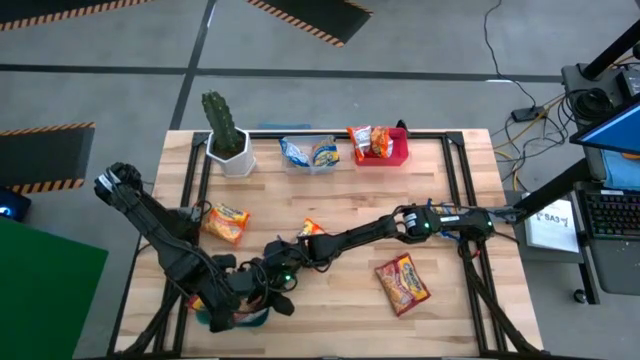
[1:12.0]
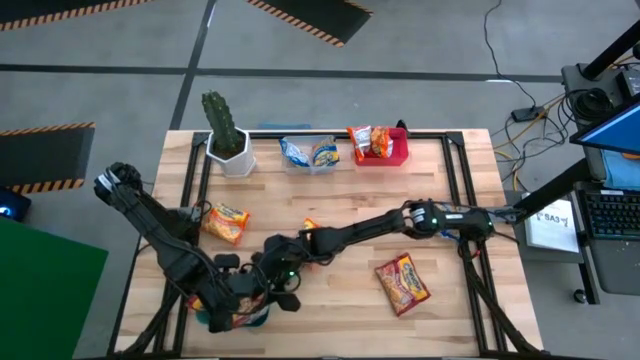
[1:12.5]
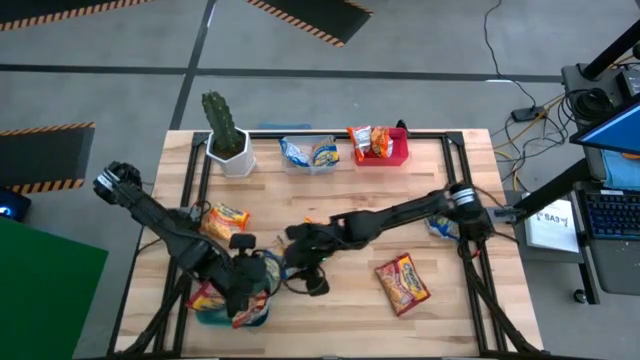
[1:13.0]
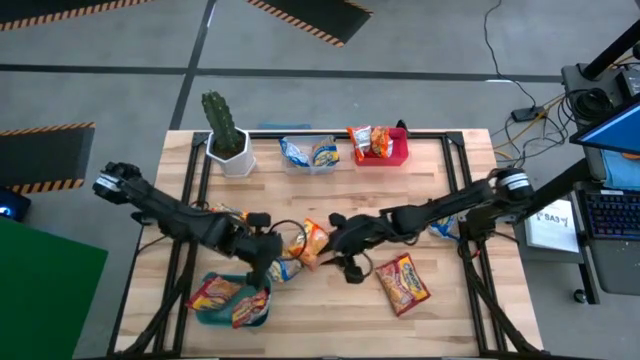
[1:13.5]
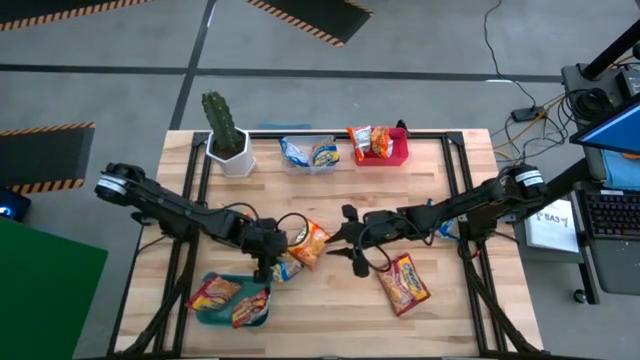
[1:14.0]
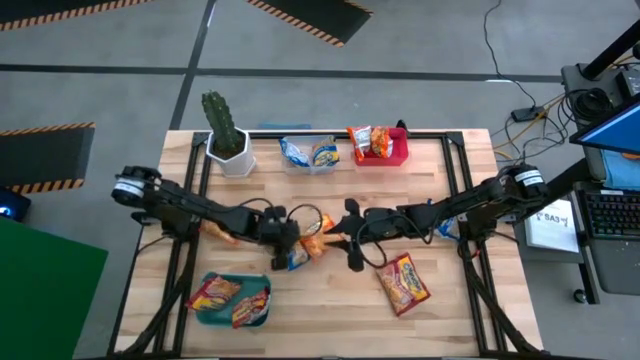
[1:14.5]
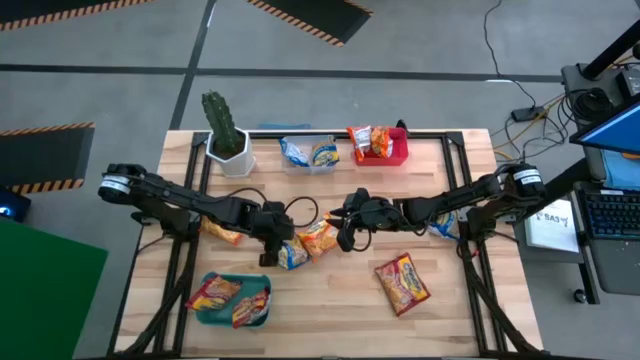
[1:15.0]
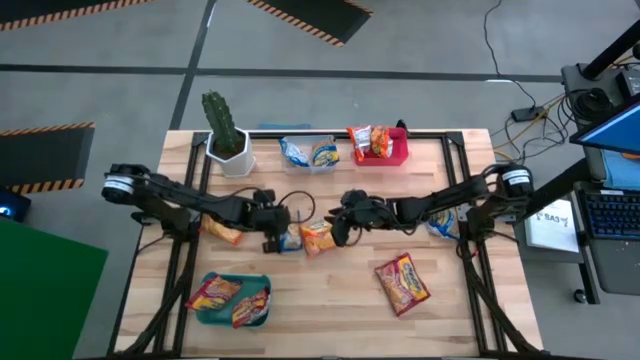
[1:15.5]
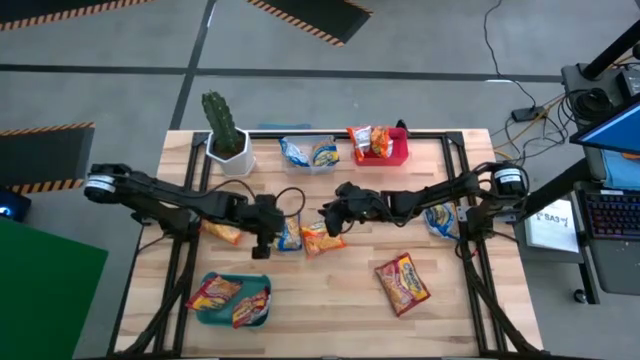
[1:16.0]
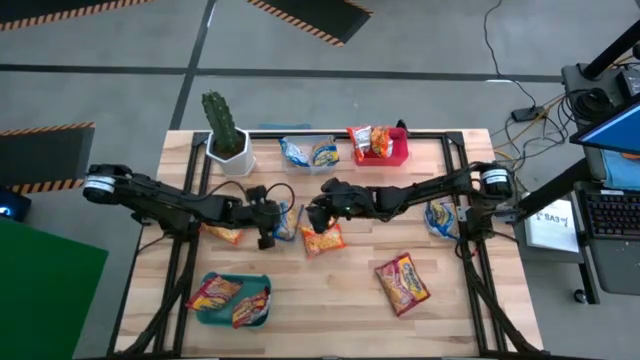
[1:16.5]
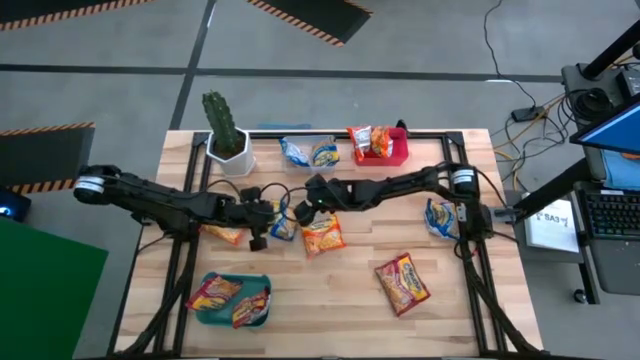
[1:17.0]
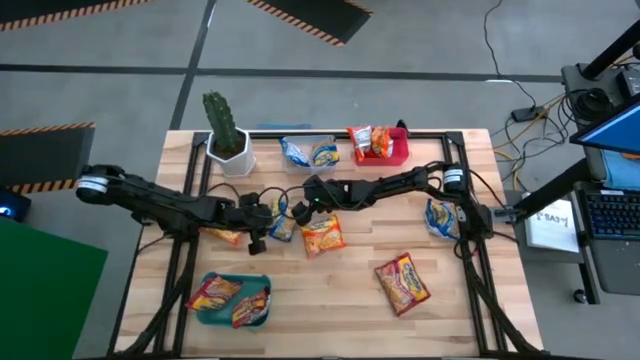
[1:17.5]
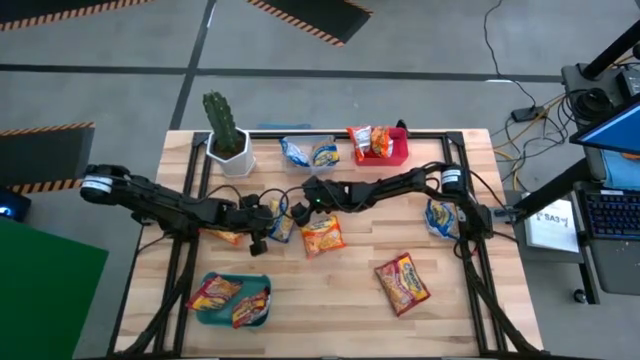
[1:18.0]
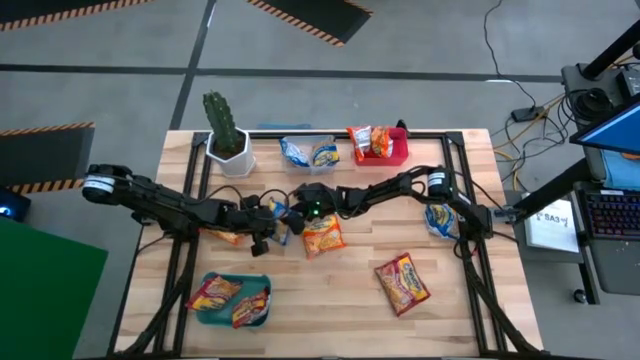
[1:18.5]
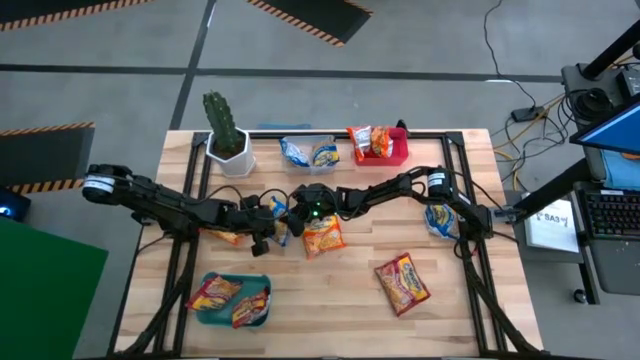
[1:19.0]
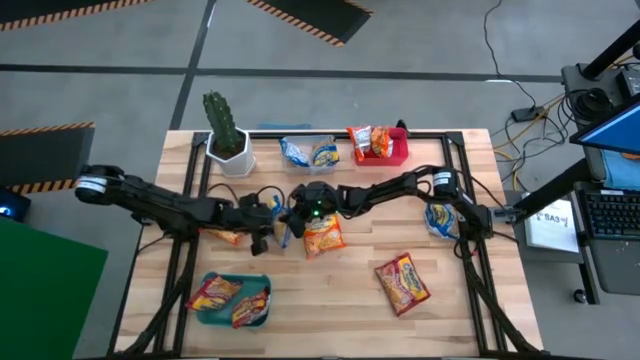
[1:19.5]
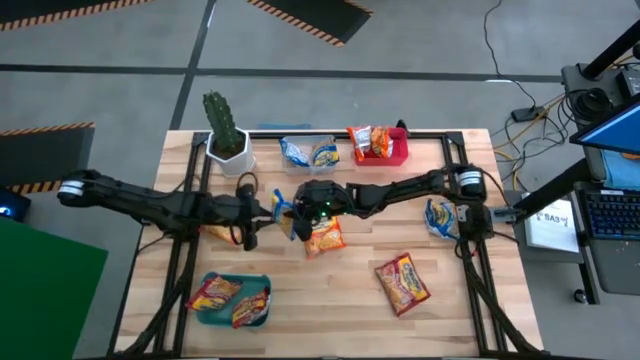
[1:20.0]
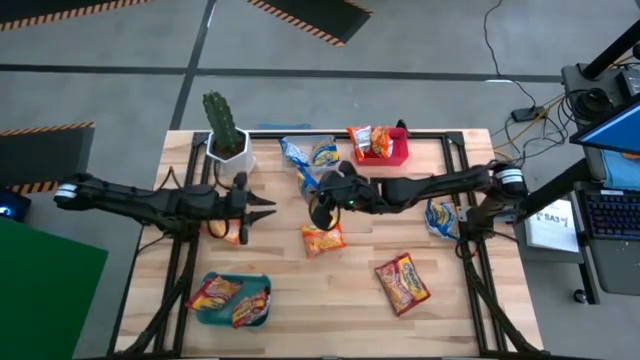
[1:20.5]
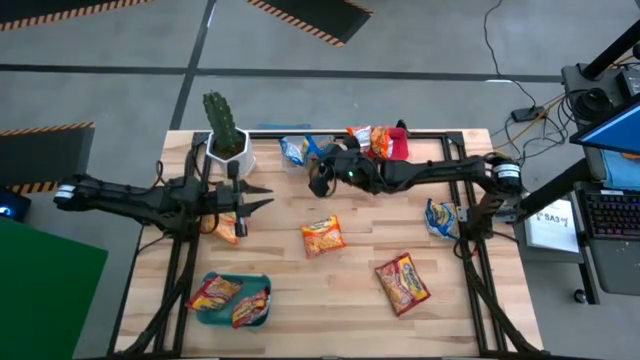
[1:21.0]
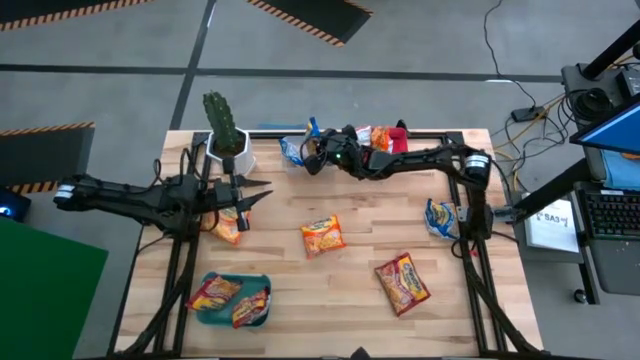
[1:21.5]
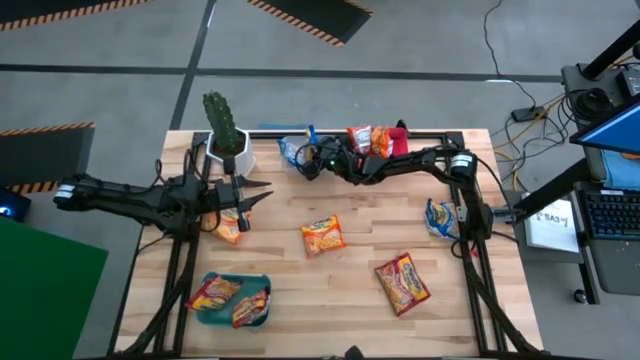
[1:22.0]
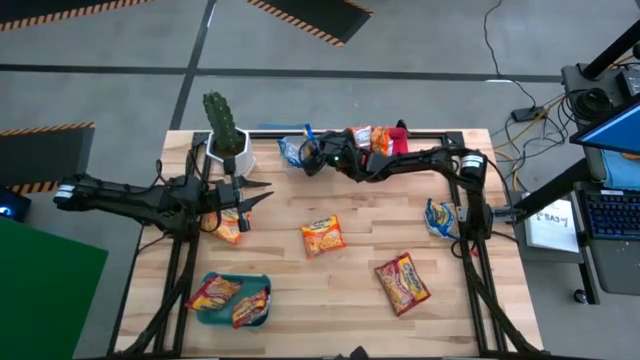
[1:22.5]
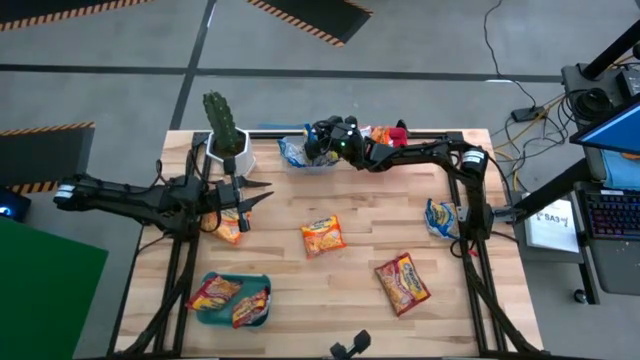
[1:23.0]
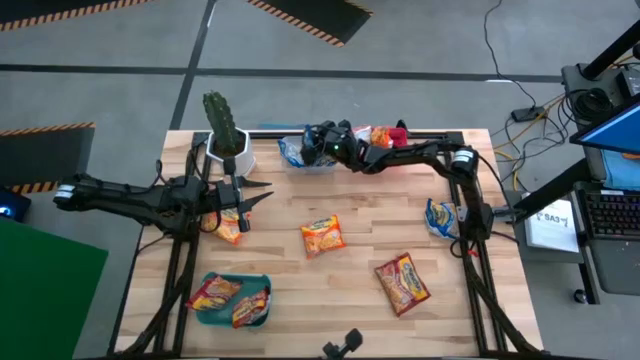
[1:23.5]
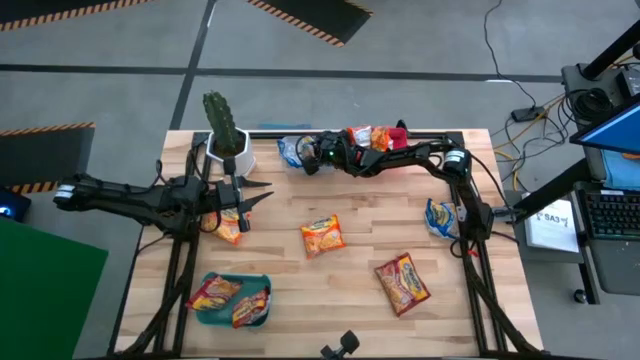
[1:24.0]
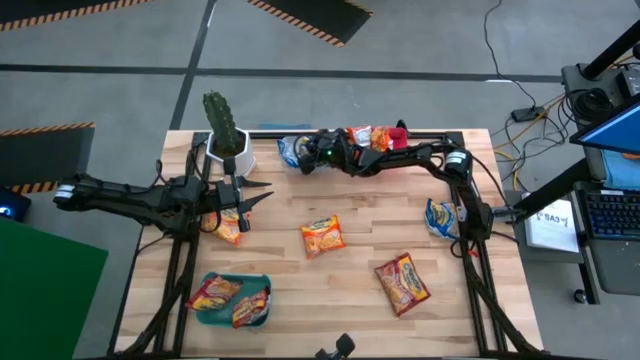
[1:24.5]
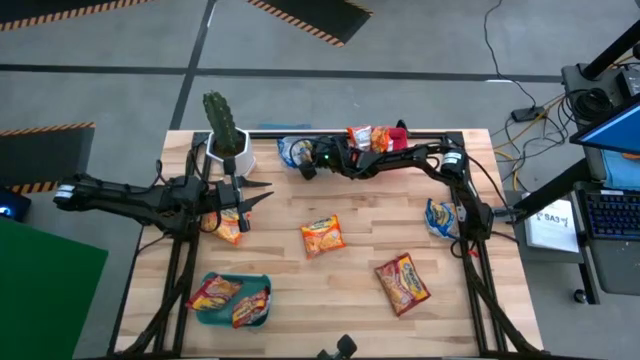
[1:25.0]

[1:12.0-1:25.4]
Task: Sort Maruchan noodles
Put the blue noodle pack into the white bin

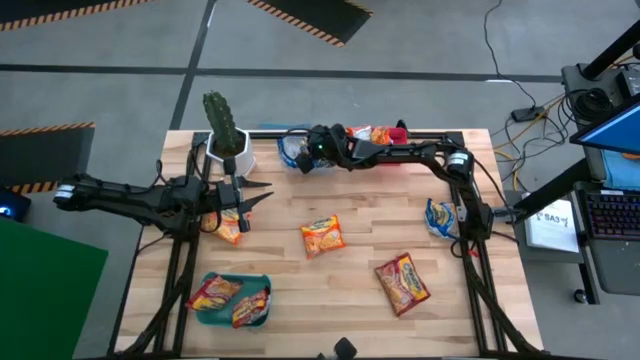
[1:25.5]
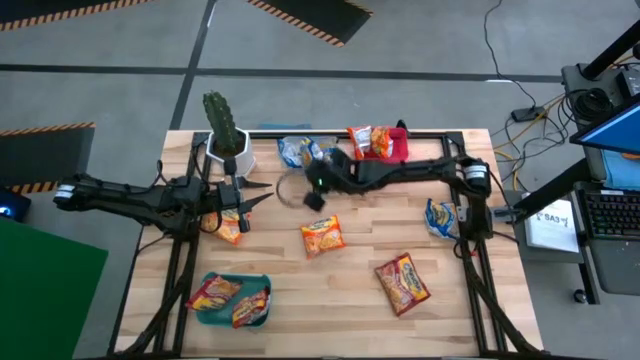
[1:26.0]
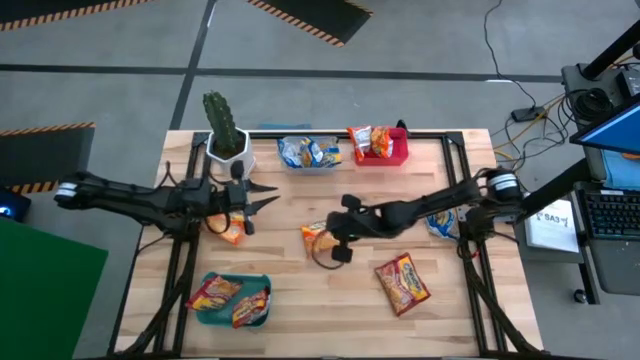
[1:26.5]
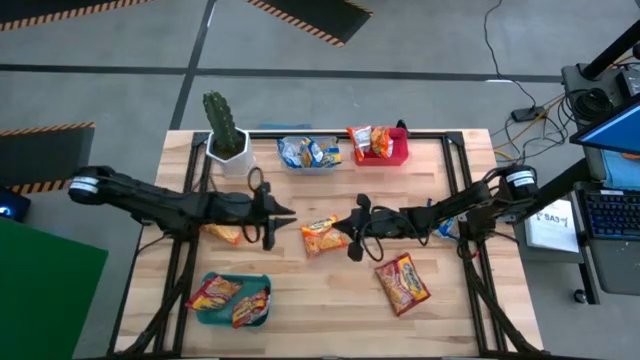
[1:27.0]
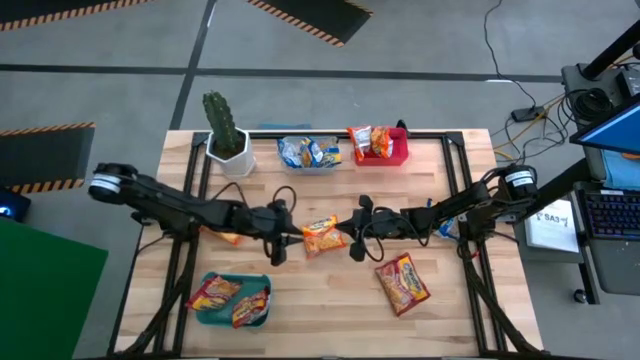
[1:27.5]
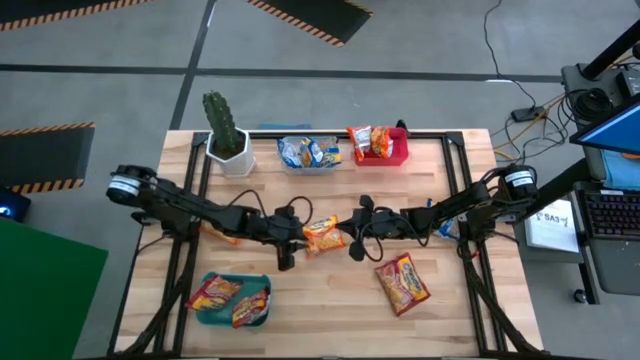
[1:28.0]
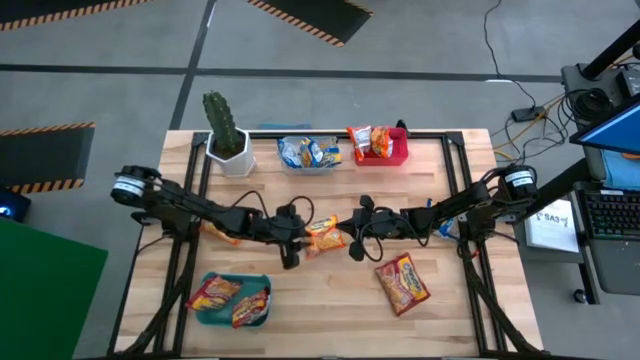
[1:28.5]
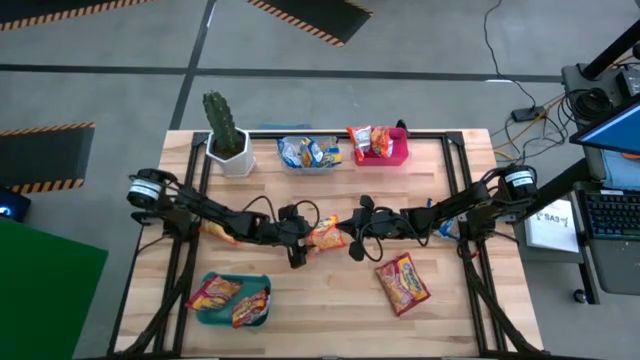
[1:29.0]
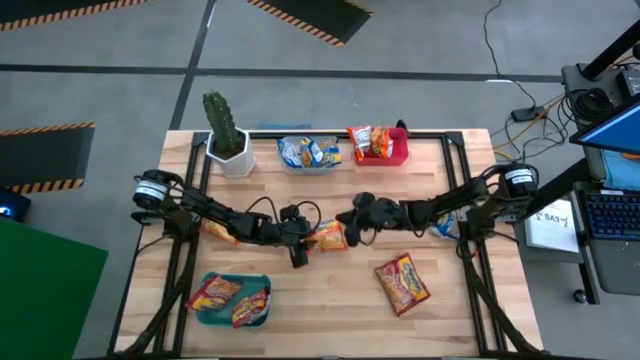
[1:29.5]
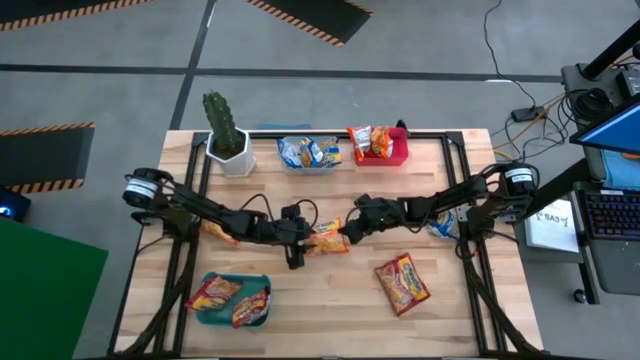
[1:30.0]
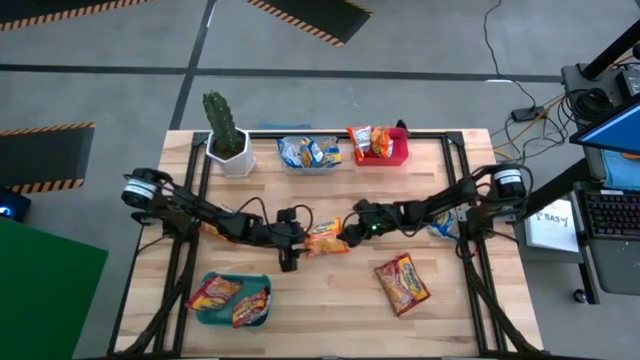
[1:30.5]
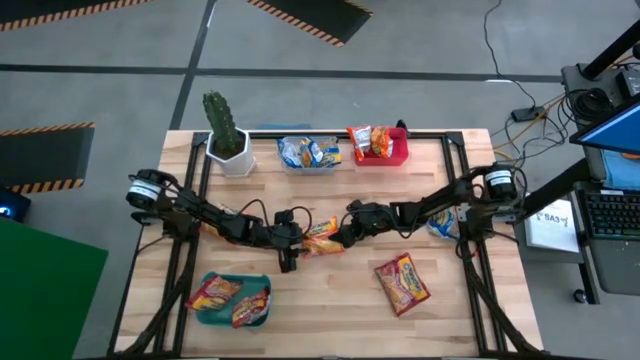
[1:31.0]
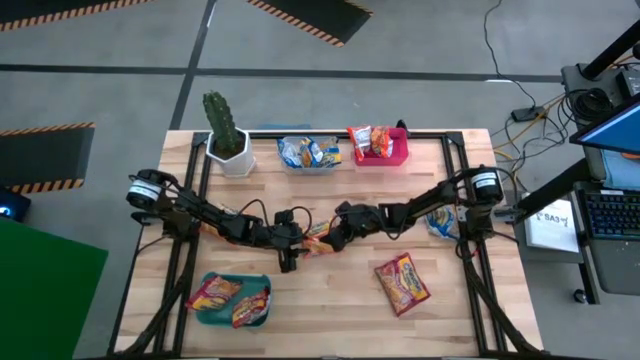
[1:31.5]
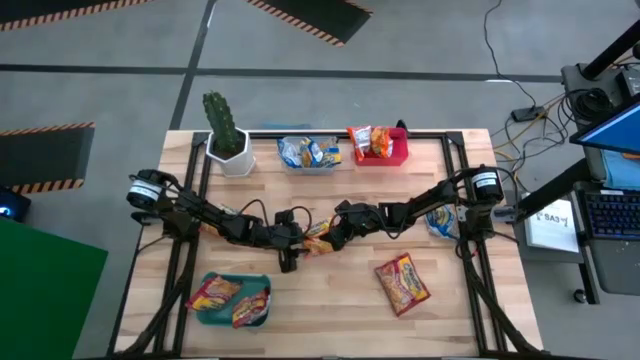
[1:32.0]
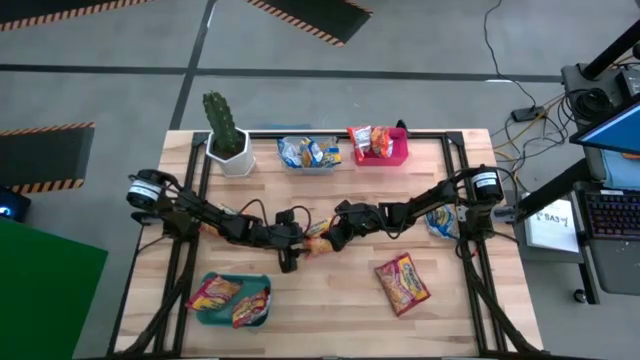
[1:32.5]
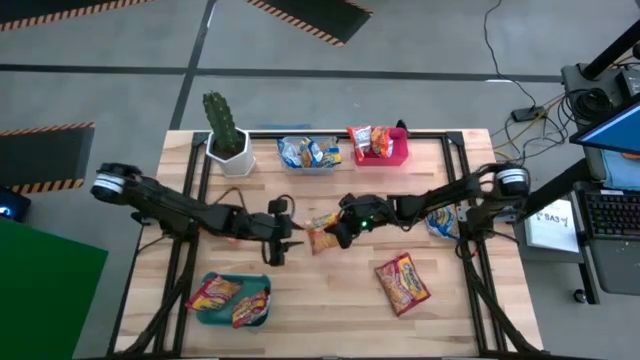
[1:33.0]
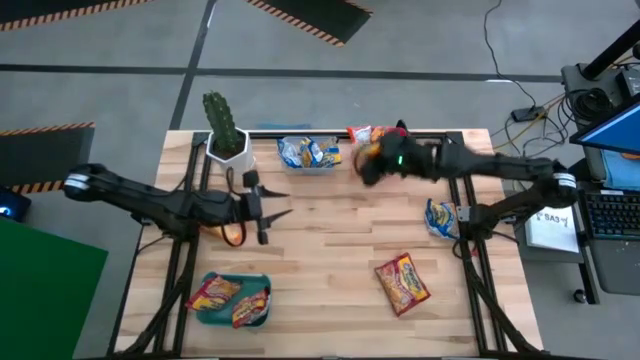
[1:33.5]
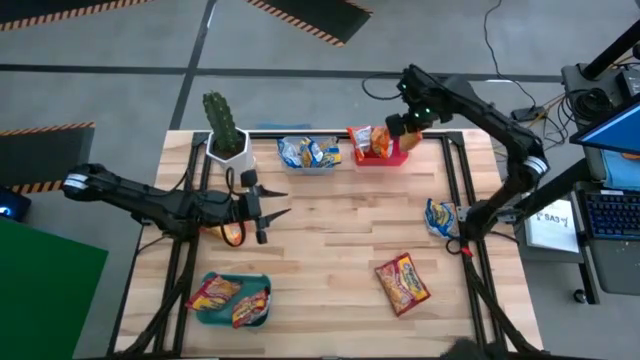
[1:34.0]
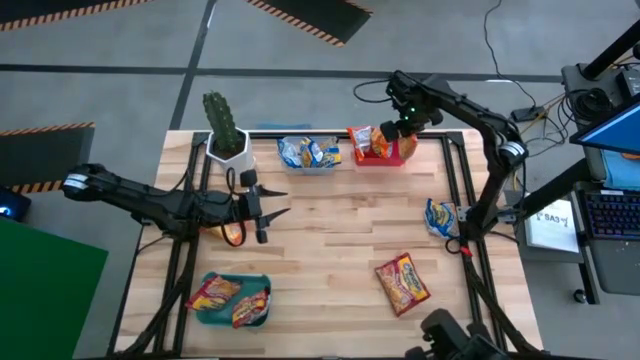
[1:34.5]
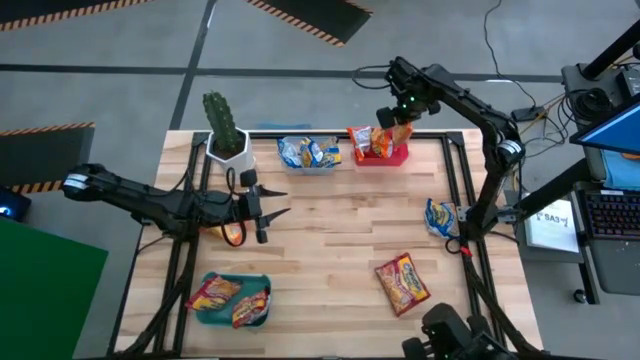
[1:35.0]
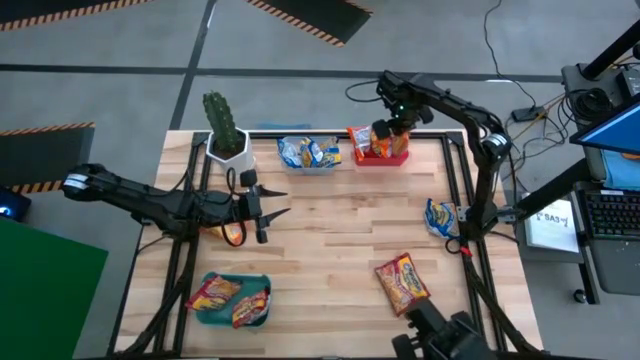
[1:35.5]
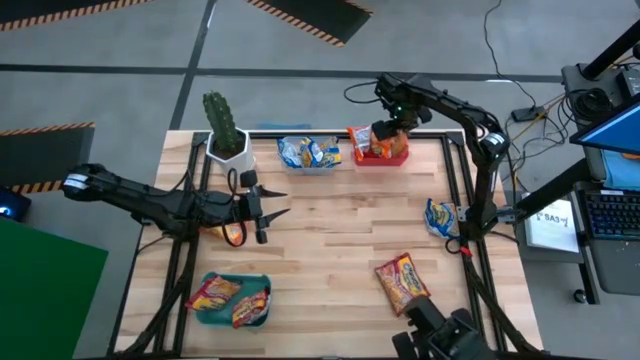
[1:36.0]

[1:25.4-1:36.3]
Put the orange noodle pack into the red bin
